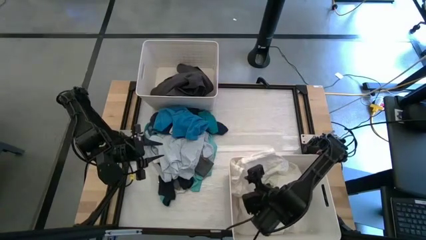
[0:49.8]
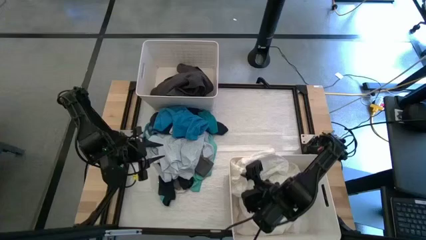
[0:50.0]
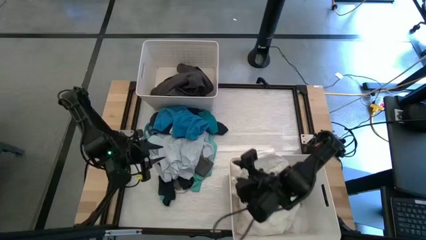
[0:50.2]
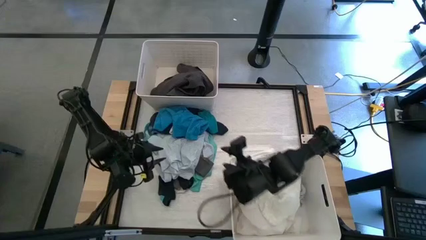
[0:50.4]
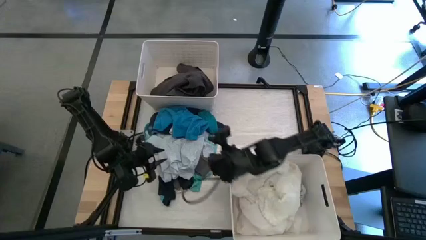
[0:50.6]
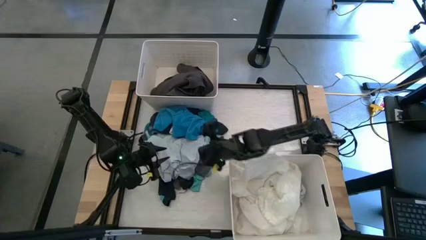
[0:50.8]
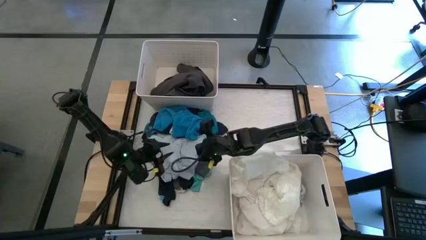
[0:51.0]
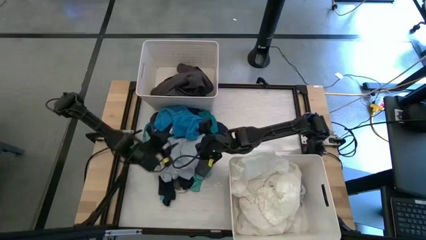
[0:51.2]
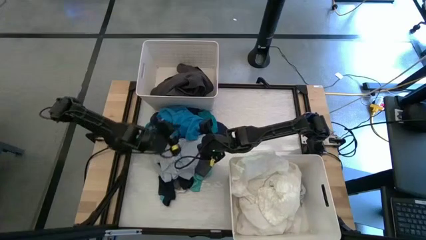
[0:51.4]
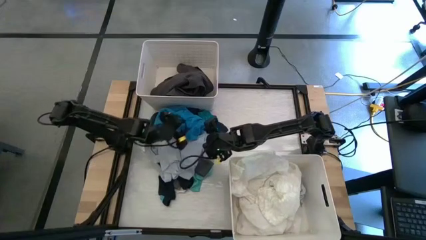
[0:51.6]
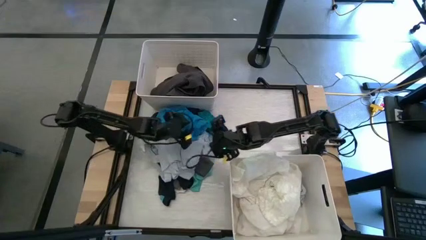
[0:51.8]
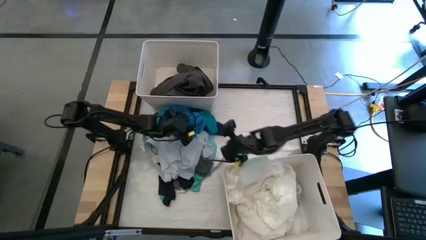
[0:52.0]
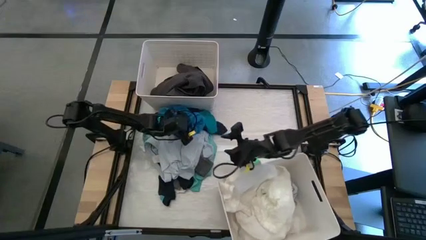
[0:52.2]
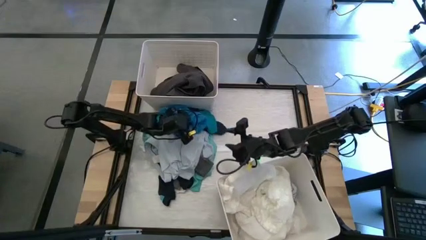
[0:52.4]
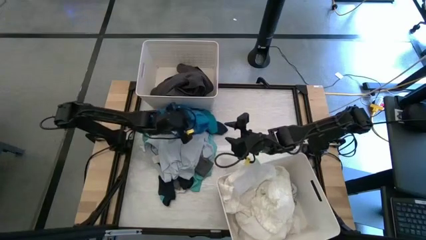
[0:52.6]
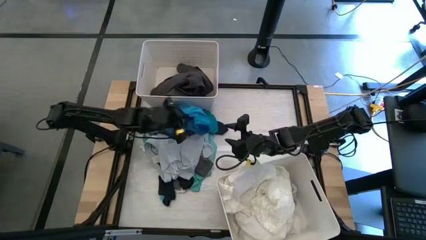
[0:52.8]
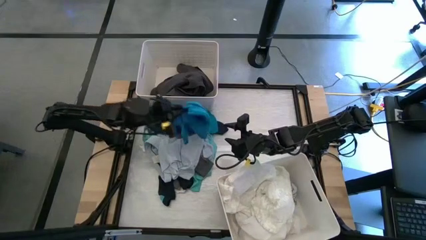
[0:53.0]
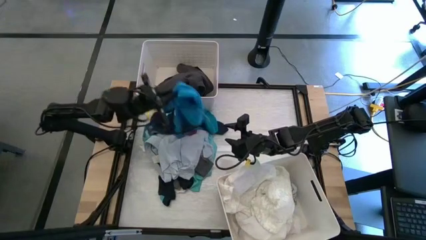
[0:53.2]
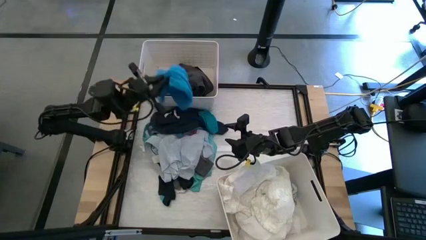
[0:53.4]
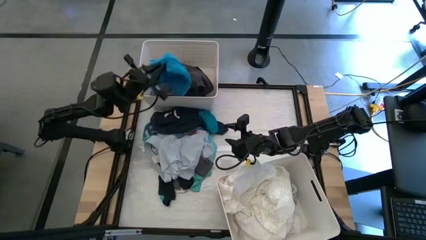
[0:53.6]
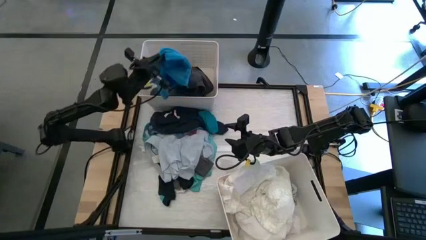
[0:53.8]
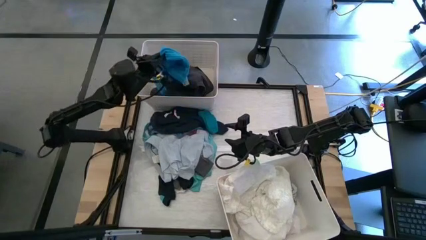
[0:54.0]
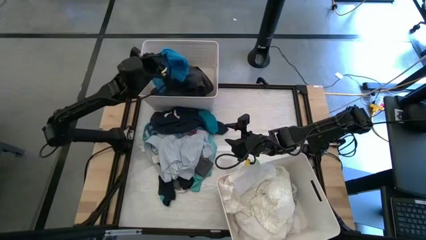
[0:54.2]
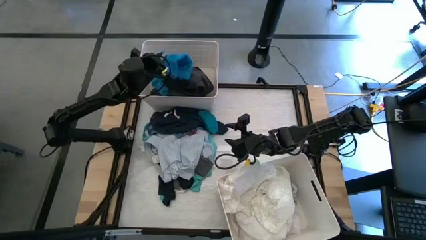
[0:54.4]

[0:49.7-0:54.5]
Task: Sort clothes
Put the blue boxer into the top white laundry organizer

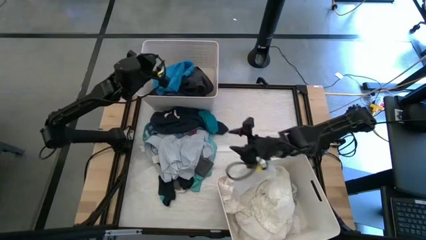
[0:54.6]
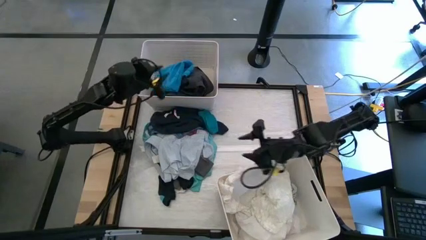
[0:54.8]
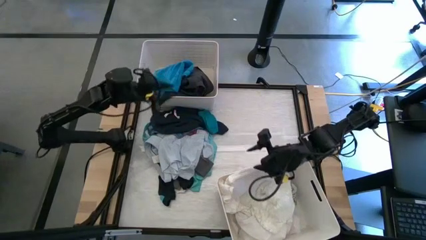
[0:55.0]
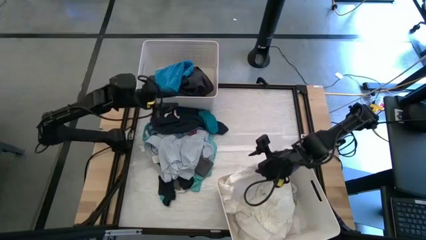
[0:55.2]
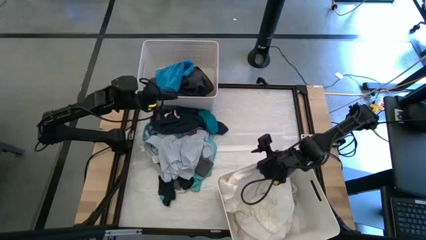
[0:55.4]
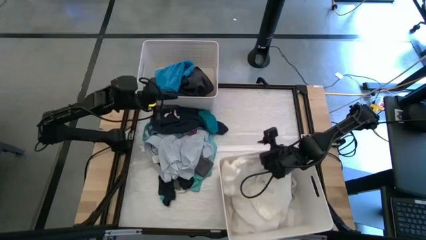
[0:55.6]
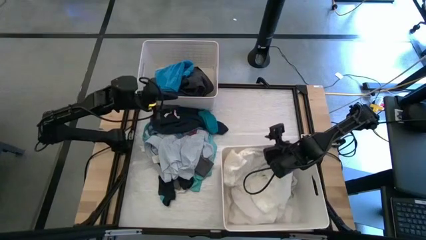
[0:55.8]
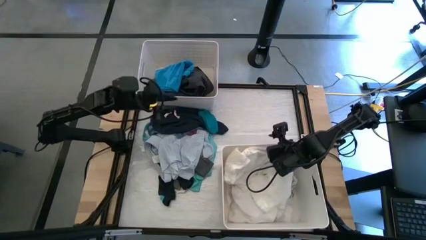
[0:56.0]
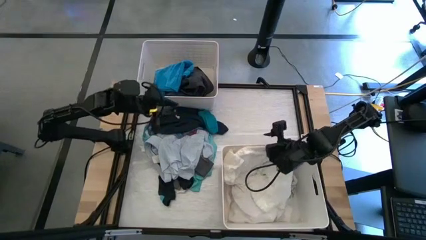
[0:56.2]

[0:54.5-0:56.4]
Adjust the bottom white laundry organizer

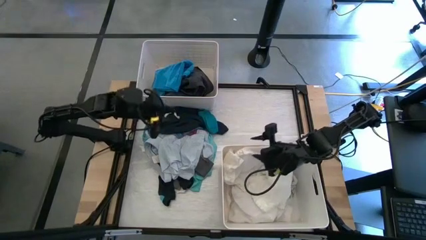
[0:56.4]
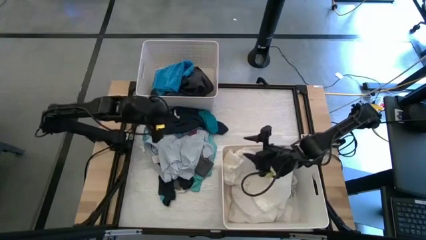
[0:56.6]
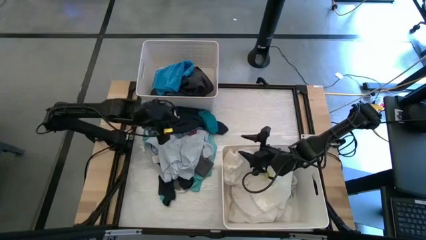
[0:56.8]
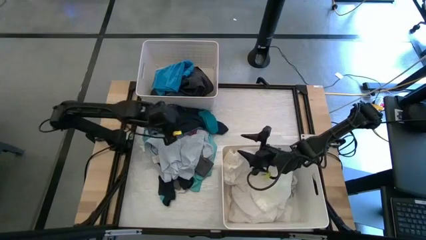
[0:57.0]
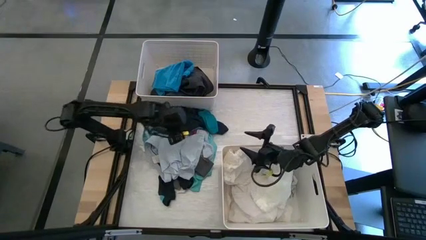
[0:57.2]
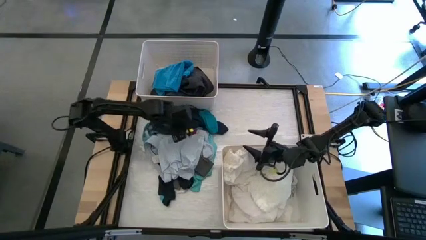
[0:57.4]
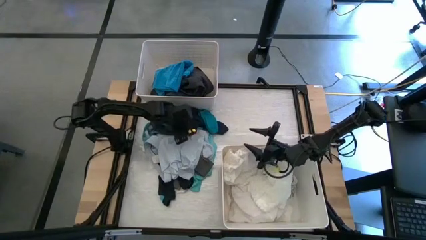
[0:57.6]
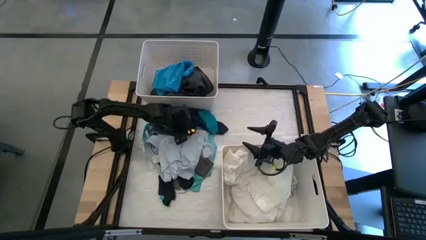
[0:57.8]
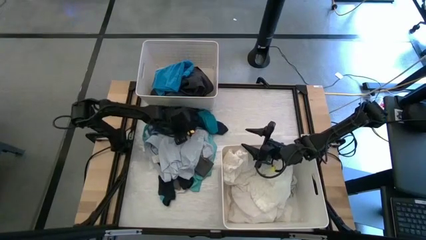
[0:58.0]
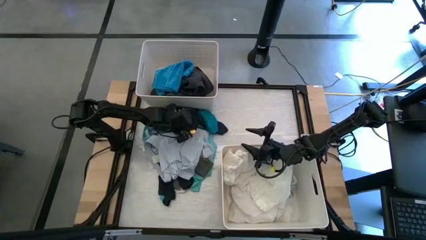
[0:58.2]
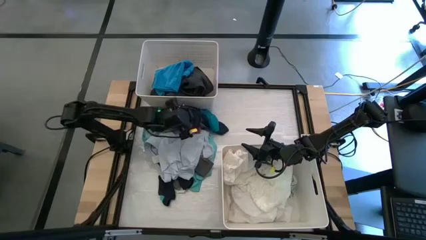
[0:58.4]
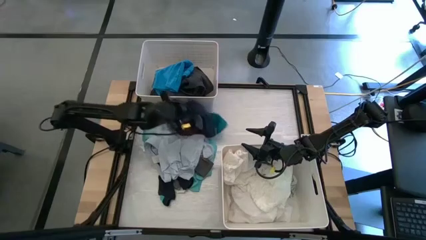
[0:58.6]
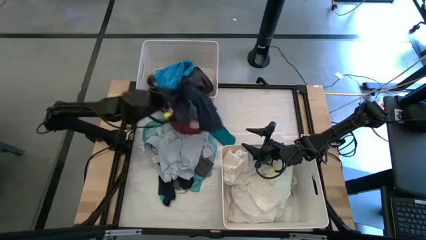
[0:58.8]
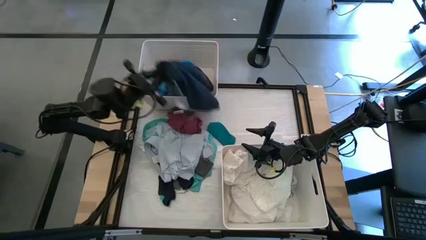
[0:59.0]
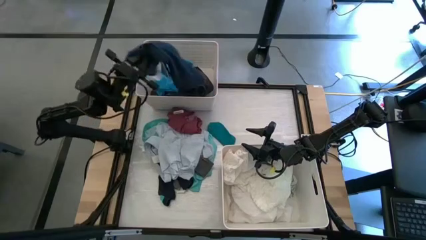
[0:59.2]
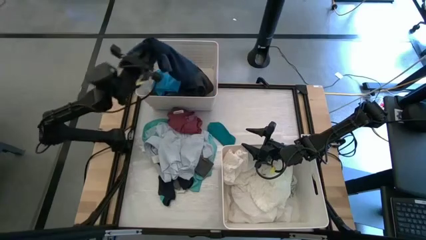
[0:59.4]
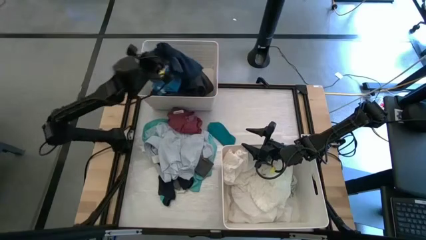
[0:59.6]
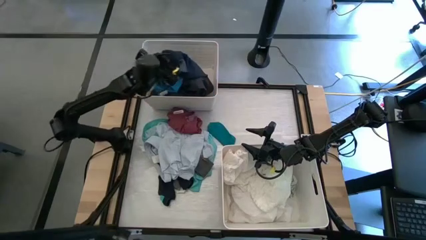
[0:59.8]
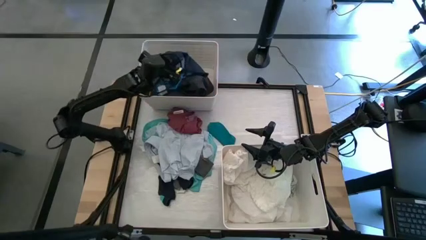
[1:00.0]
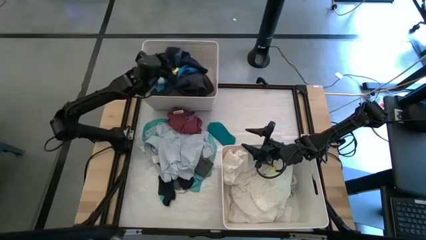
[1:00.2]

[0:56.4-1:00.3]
Put the gray shorts into the top white laundry organizer

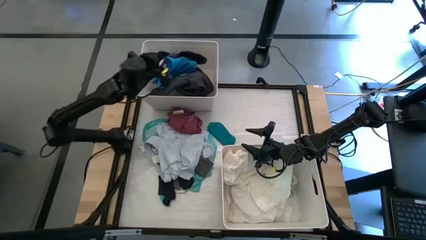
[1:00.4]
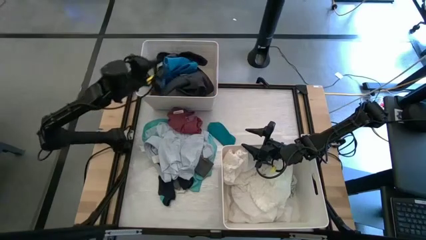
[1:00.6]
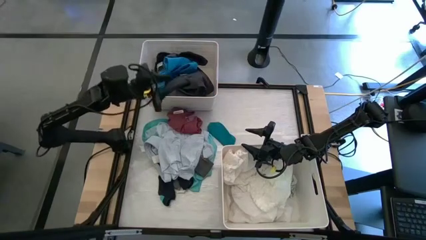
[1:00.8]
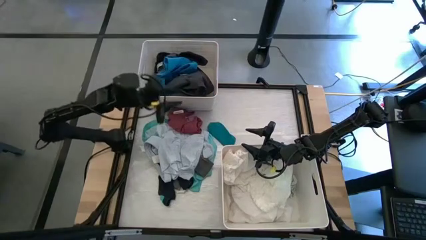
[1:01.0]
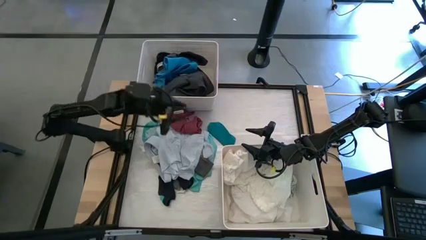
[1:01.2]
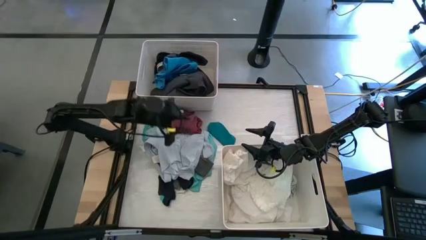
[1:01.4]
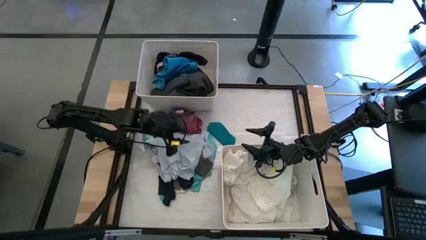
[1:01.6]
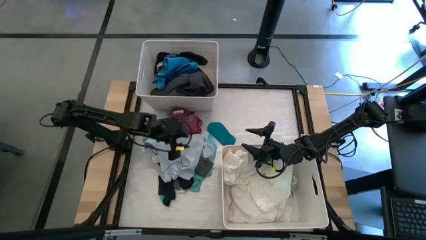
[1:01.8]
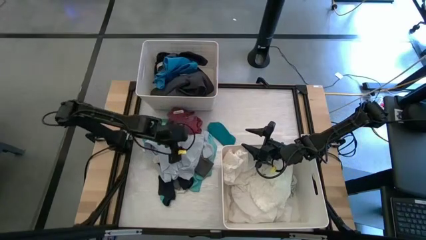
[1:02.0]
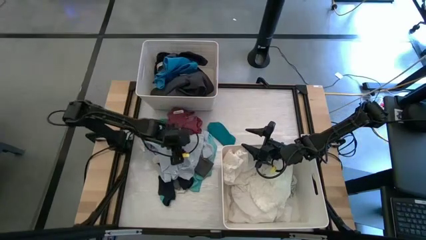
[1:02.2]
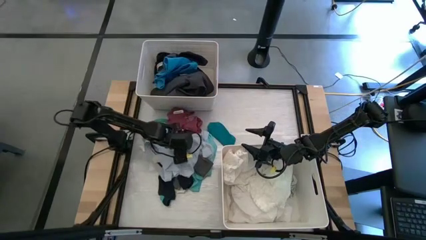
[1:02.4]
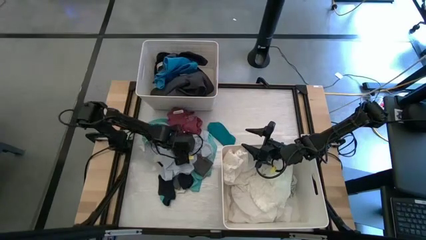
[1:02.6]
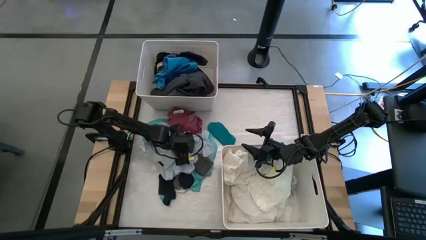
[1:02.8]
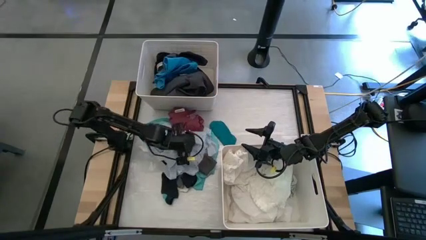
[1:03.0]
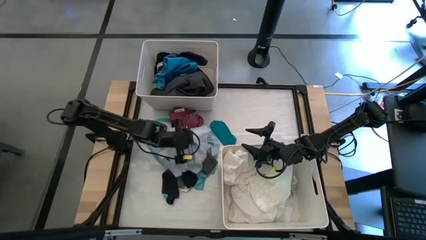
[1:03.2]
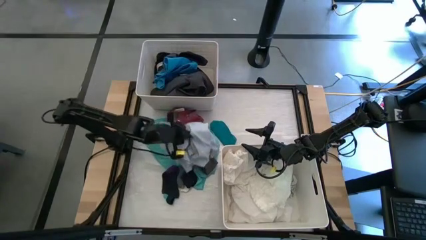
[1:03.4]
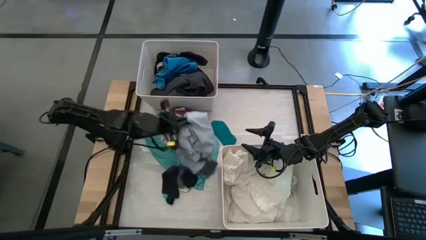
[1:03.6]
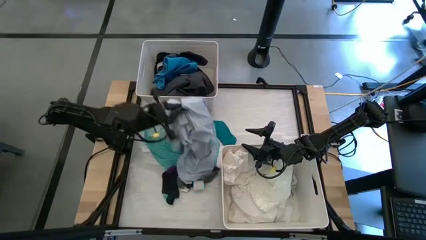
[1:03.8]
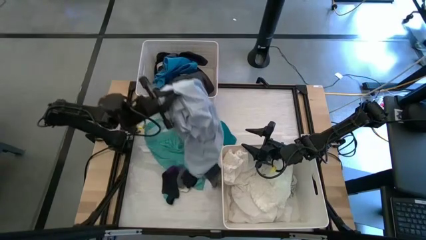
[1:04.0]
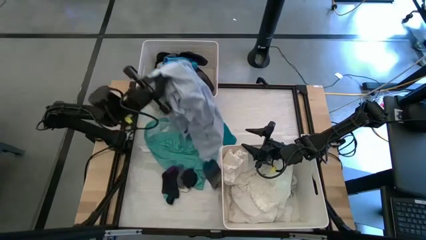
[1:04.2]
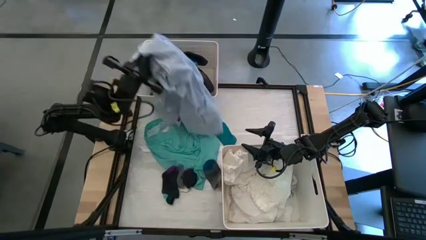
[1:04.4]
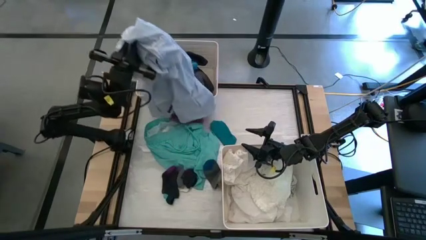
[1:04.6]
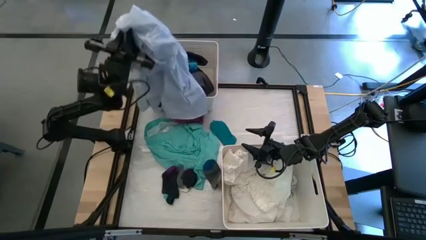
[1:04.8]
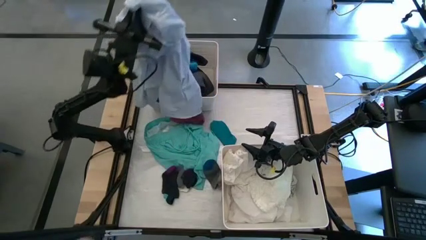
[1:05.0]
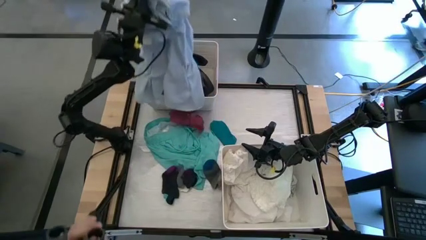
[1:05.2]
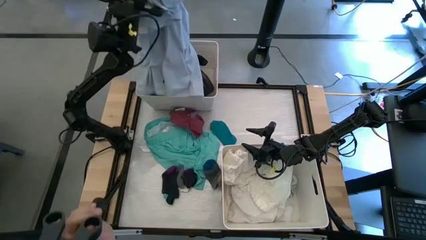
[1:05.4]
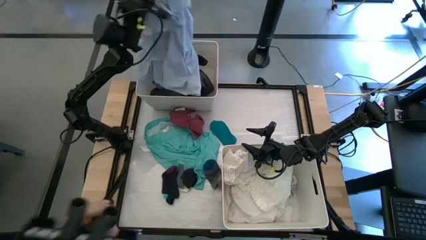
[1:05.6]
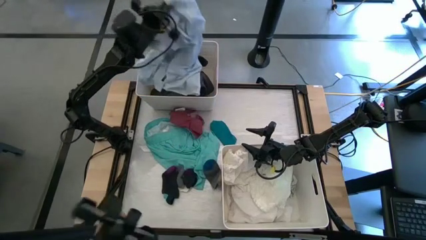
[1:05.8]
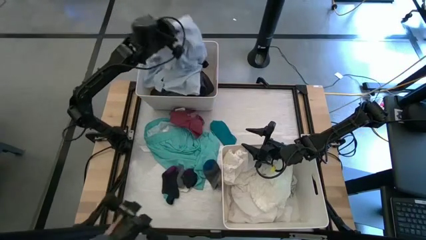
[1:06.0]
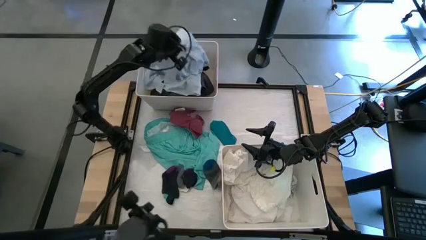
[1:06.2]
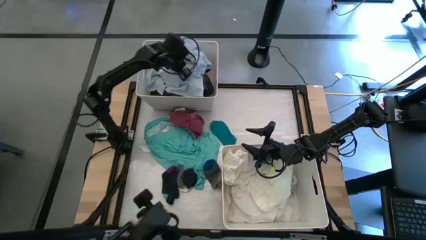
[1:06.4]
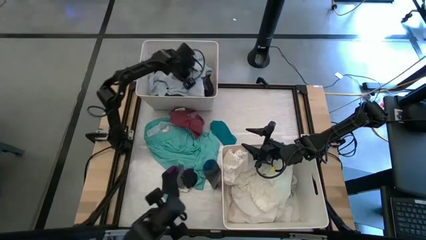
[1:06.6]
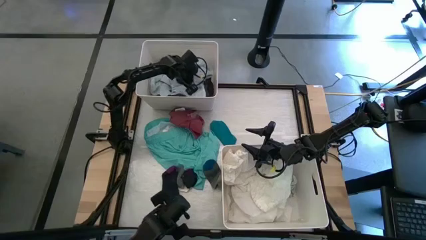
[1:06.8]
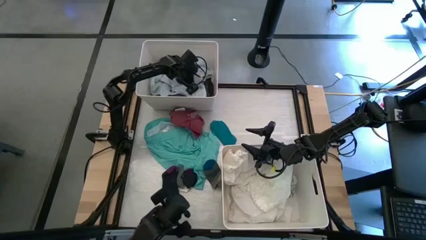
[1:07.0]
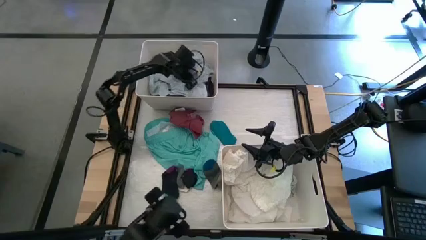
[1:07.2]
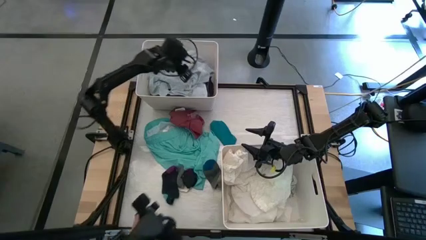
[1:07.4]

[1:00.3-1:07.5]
Put the blue patterned dress into the top white laundry organizer
